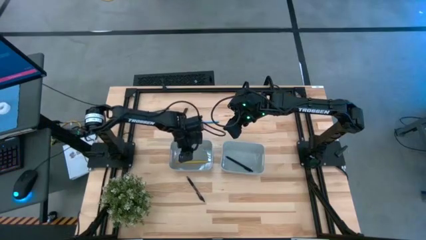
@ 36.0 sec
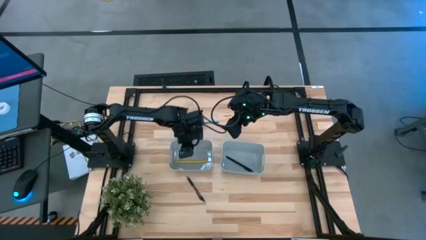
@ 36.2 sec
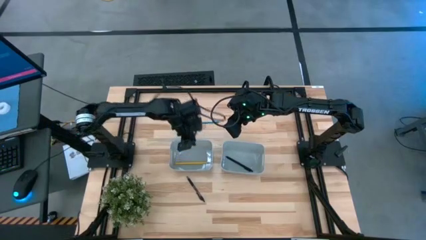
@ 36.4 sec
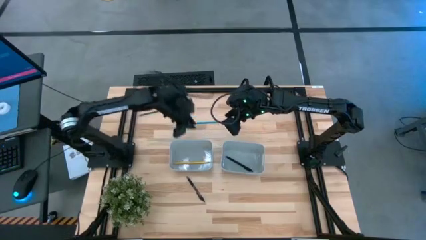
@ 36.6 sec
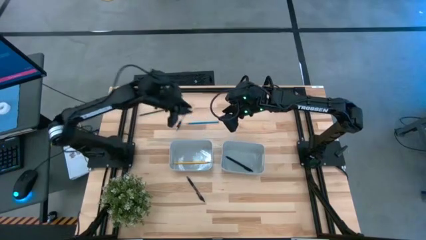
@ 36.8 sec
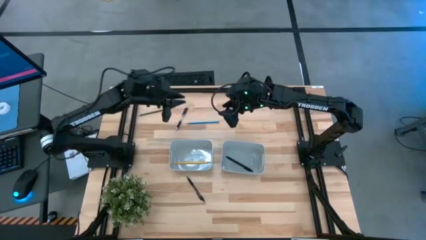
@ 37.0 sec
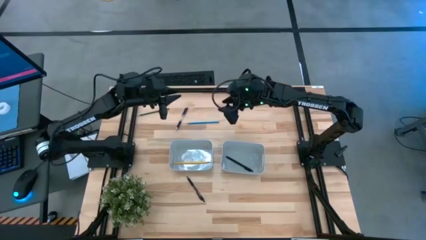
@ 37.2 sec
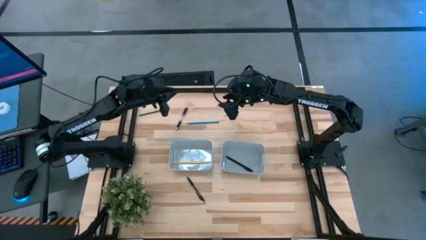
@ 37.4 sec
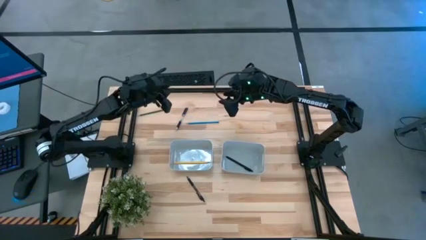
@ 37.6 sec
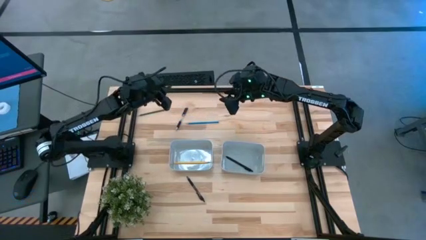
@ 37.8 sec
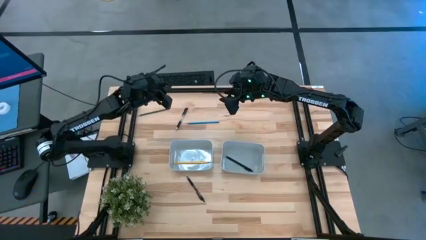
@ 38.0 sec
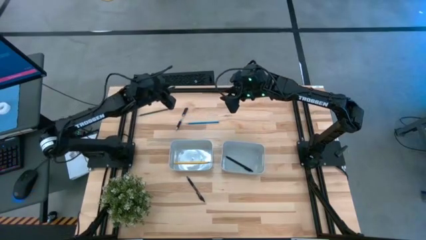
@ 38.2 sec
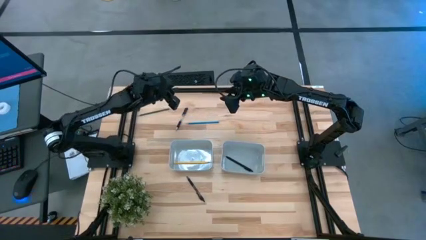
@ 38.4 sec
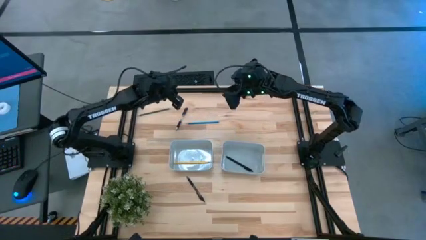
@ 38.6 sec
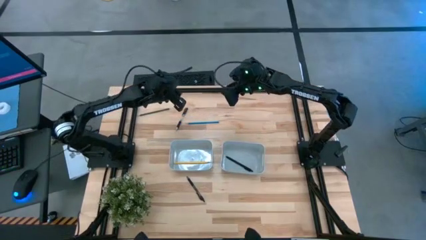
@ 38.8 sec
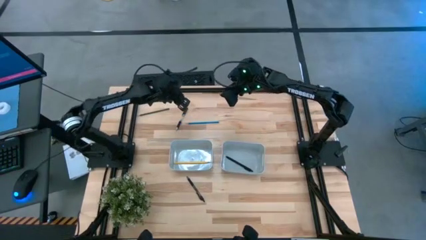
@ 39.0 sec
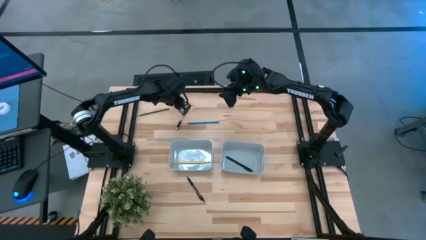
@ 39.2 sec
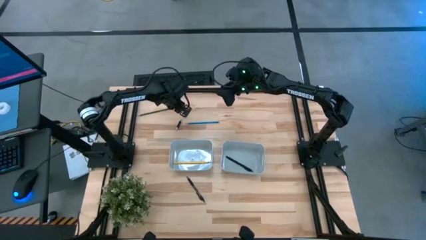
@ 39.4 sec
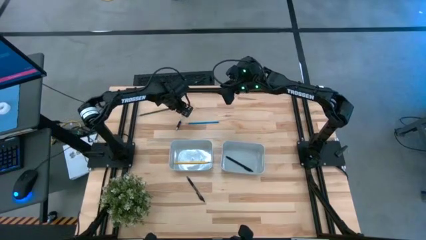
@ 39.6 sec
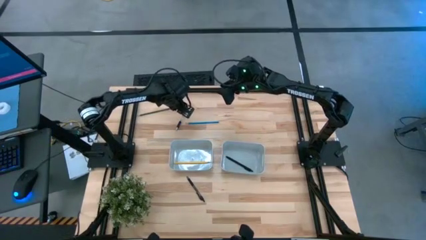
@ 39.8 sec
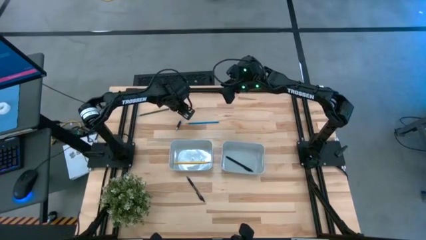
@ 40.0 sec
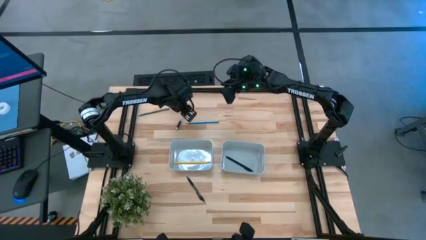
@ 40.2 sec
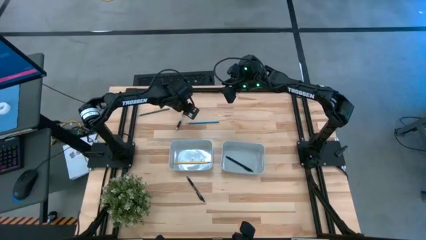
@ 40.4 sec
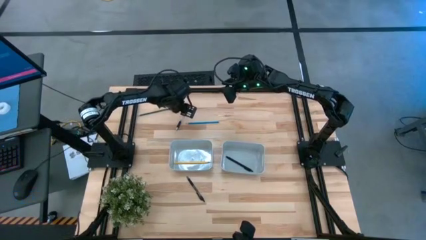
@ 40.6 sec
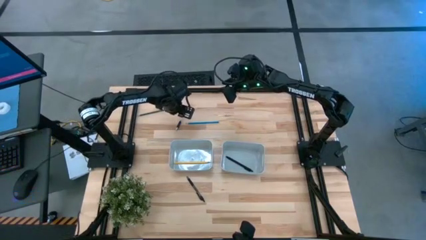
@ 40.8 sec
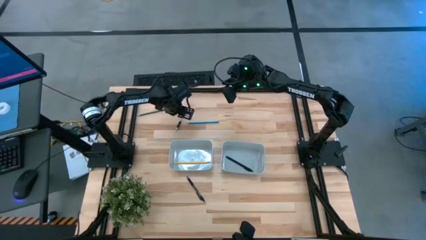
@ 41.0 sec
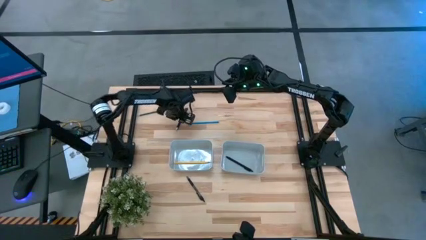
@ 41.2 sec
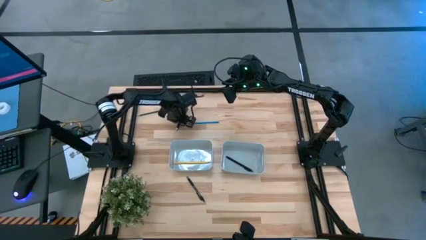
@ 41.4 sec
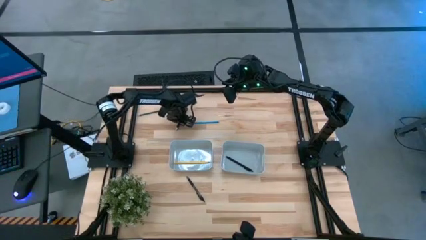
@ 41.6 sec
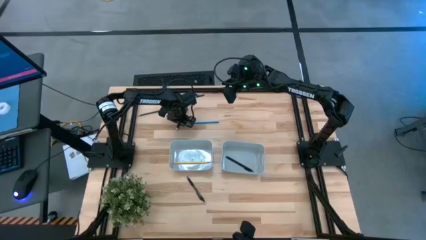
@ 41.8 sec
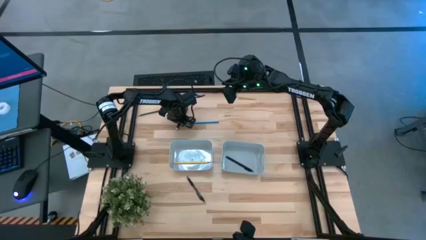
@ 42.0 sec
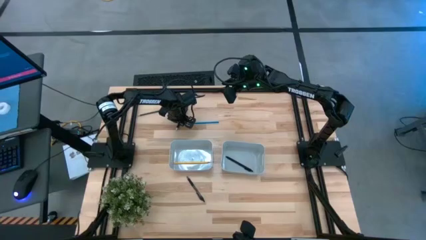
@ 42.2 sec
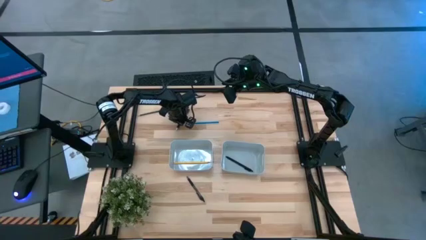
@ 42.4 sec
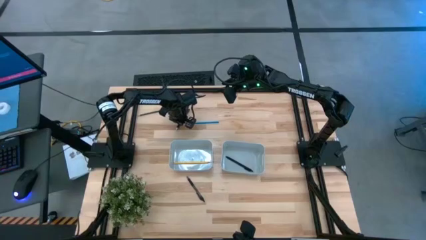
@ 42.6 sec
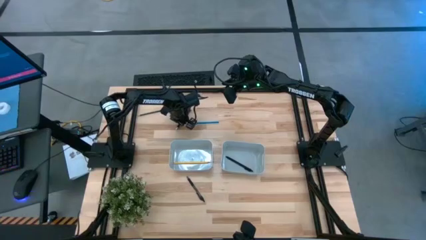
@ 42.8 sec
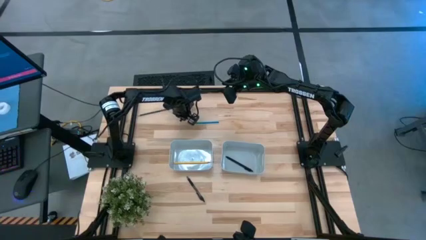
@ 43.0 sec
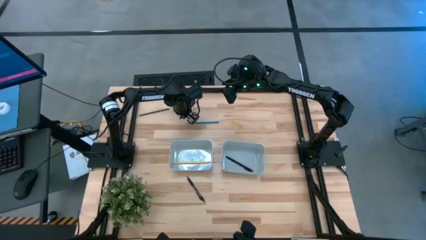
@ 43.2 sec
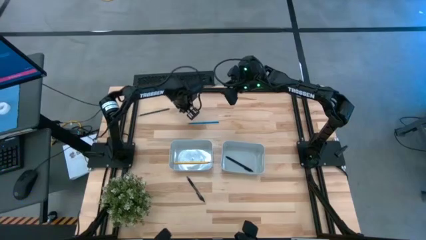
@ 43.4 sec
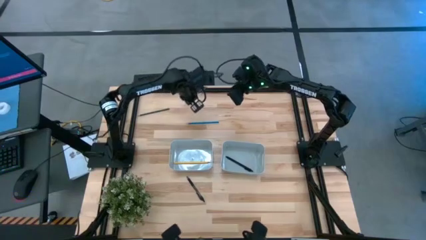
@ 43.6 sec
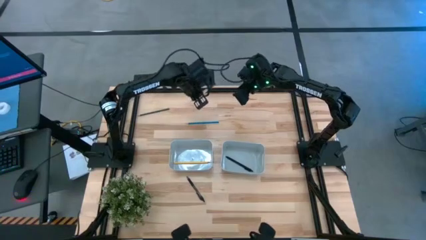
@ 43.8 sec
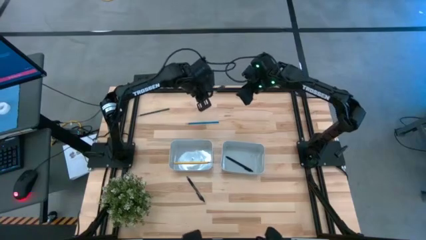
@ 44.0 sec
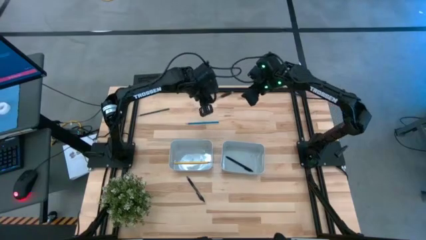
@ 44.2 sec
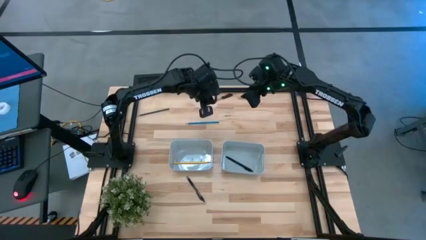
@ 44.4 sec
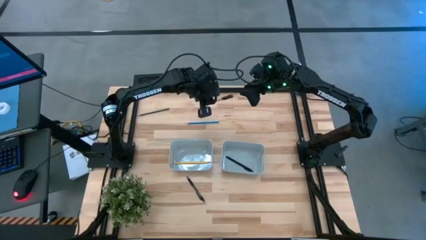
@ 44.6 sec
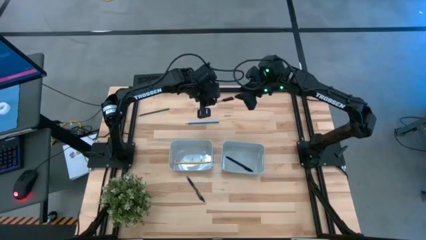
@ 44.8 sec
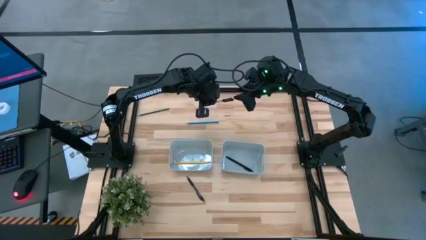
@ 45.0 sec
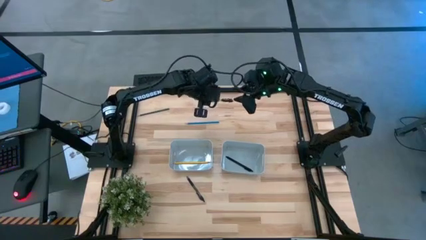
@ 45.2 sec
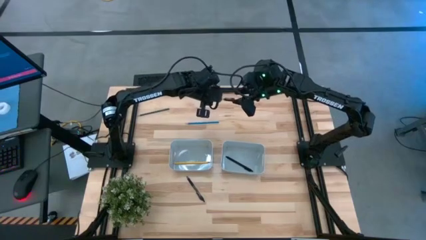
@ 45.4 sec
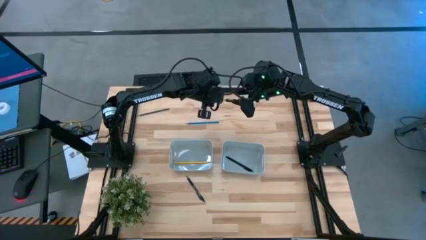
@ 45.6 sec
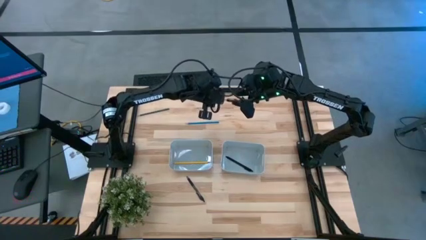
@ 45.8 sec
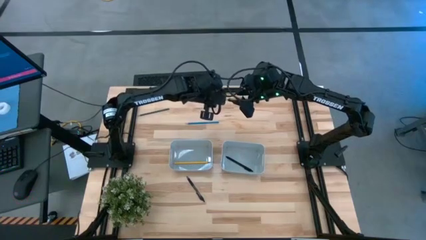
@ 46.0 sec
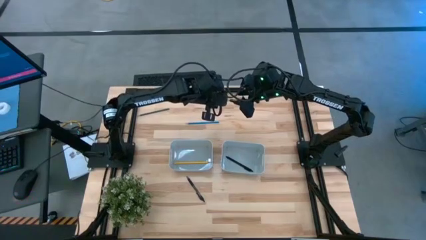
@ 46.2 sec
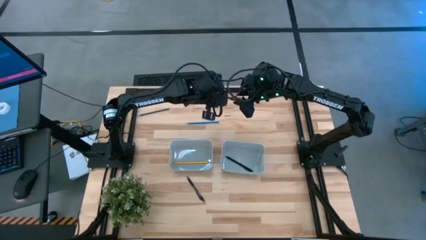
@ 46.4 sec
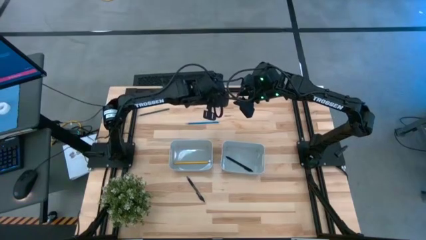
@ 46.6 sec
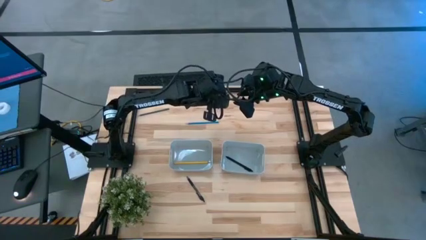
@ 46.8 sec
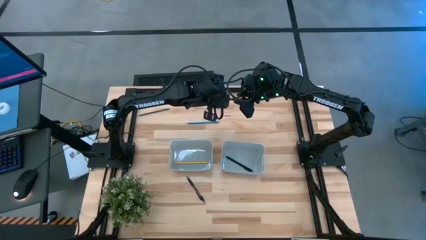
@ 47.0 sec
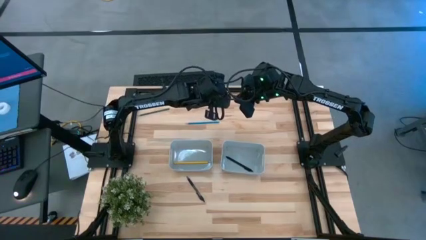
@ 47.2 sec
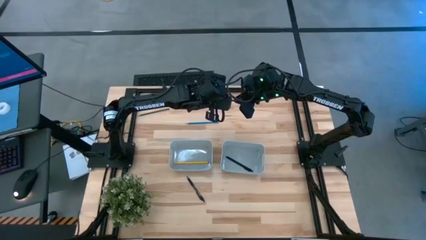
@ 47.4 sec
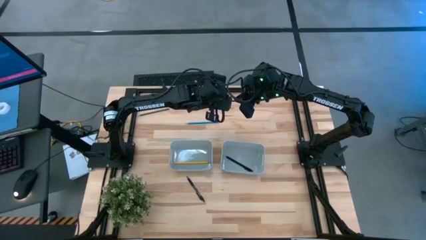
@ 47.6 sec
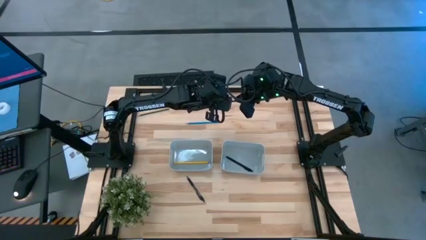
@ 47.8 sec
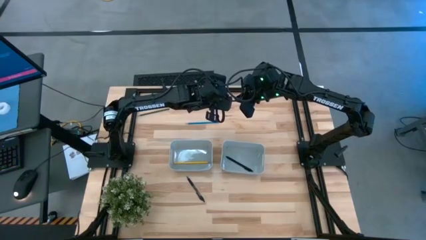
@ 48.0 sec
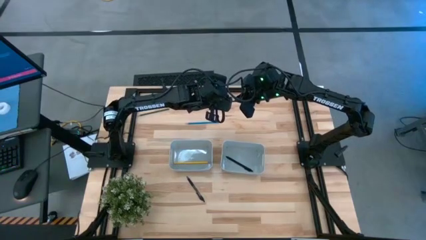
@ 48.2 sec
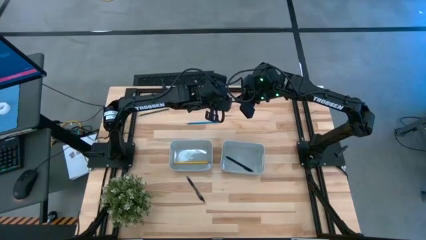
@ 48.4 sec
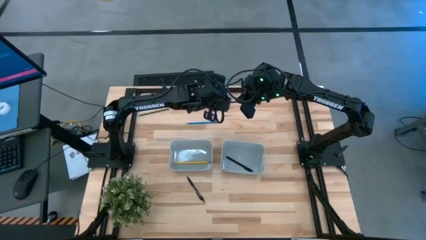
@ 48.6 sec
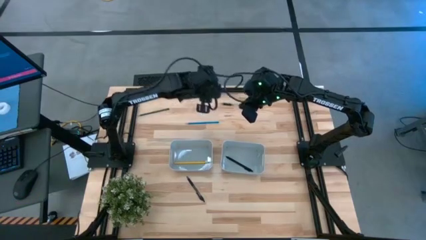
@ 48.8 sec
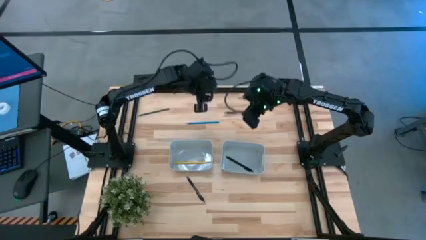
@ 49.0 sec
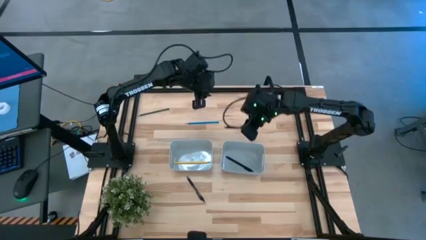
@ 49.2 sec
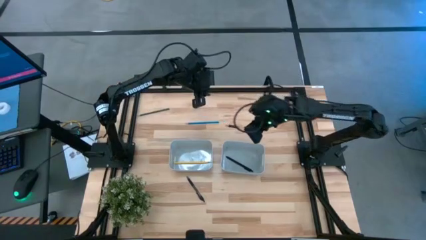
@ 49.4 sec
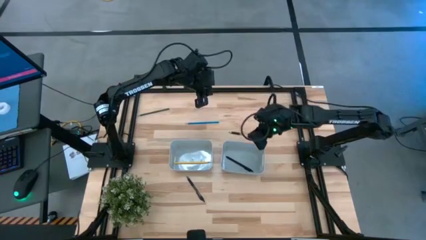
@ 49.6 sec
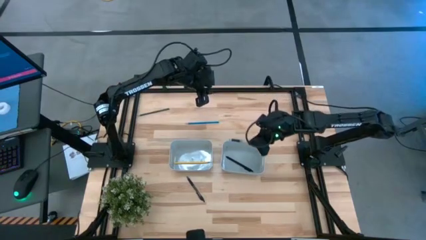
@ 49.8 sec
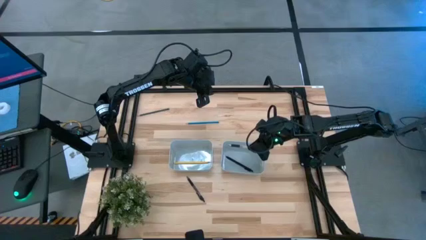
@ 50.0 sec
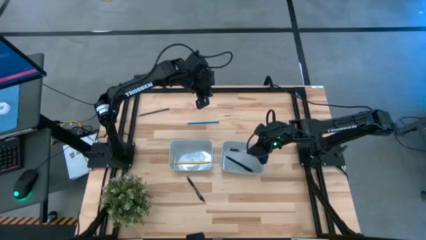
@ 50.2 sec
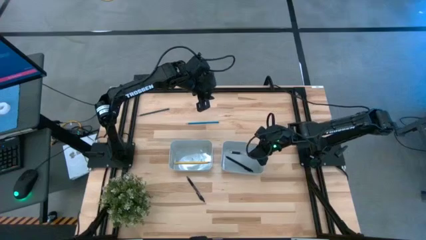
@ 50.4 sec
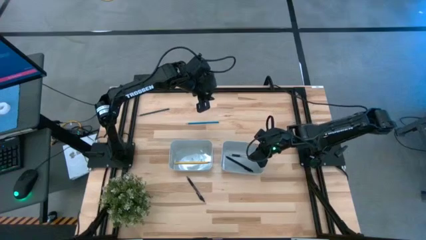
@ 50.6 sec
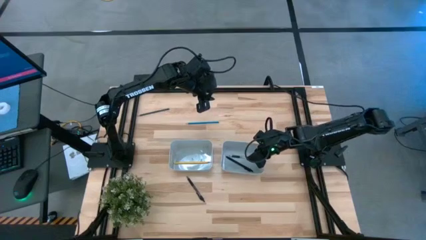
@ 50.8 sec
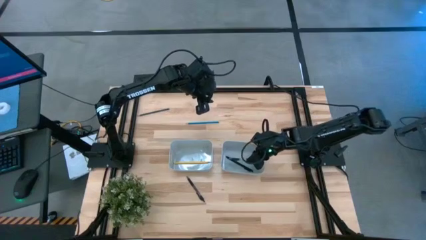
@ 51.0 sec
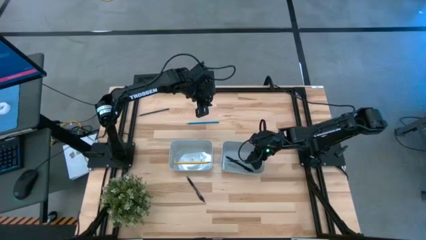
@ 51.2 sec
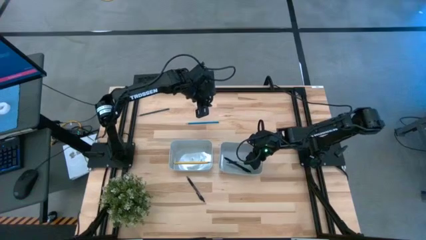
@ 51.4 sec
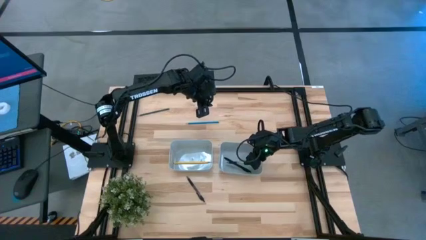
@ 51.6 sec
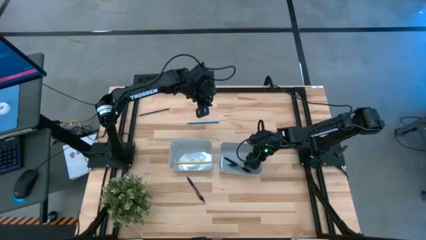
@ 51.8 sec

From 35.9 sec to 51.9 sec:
Task: Sort pens & pencils
Put the top black pen into the right gray bin
